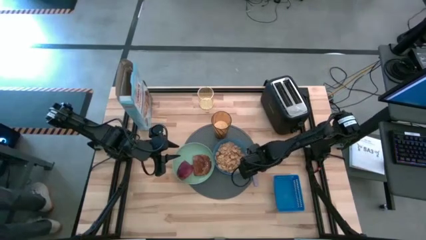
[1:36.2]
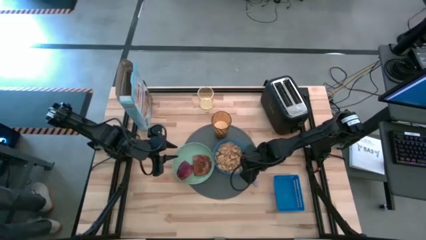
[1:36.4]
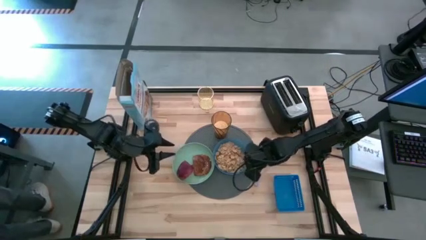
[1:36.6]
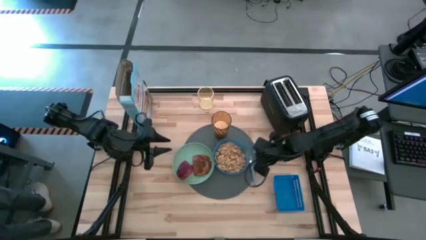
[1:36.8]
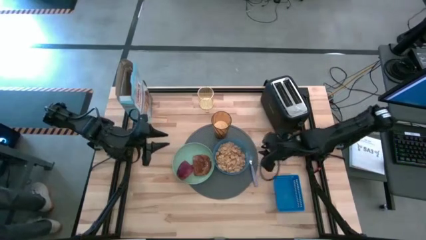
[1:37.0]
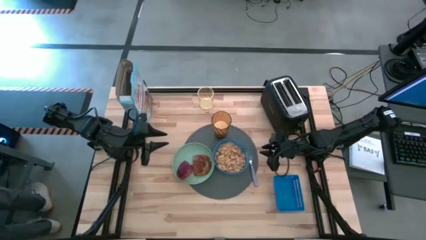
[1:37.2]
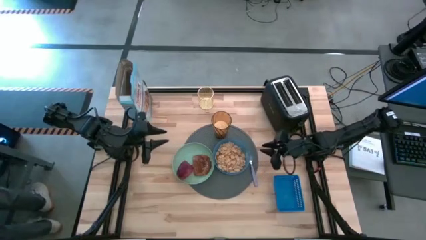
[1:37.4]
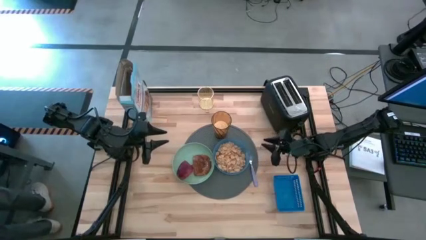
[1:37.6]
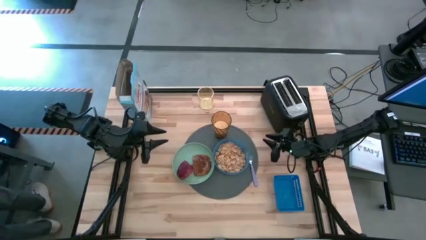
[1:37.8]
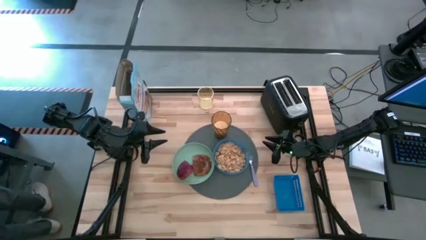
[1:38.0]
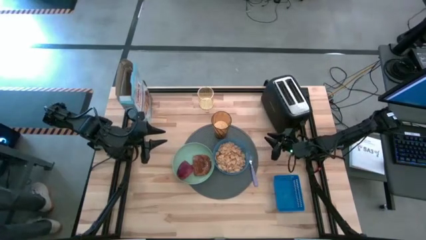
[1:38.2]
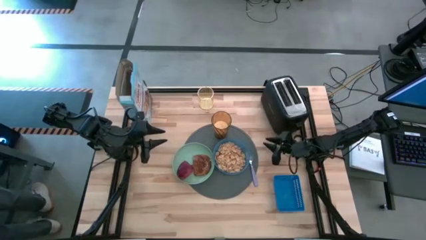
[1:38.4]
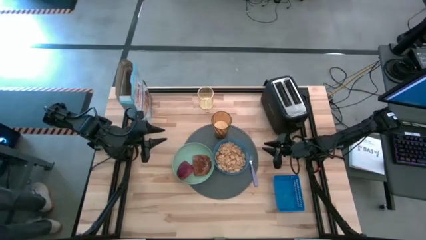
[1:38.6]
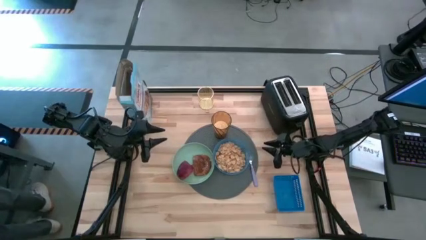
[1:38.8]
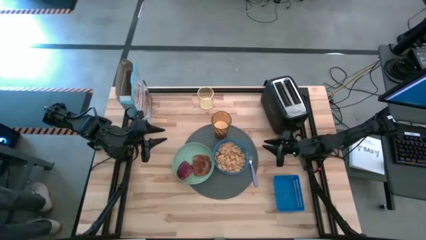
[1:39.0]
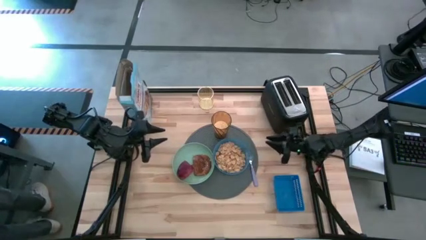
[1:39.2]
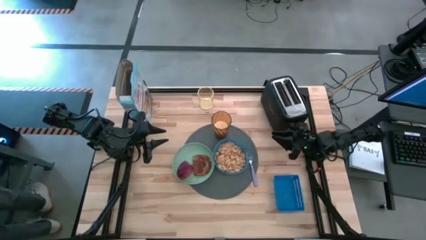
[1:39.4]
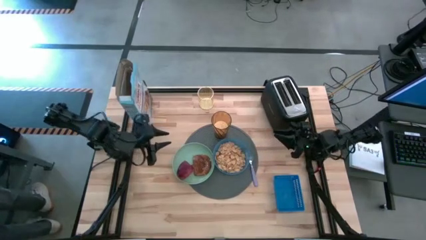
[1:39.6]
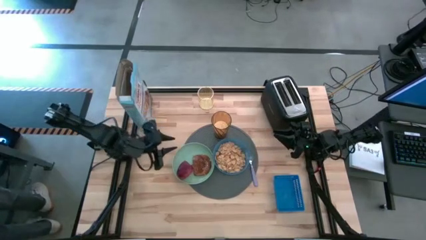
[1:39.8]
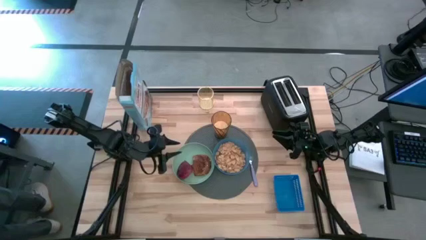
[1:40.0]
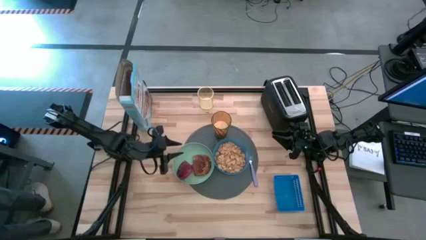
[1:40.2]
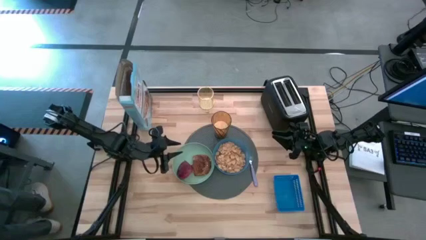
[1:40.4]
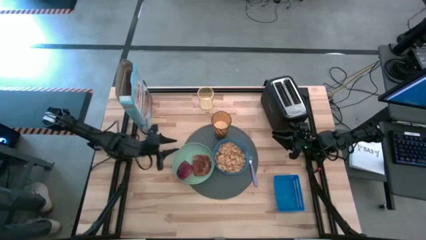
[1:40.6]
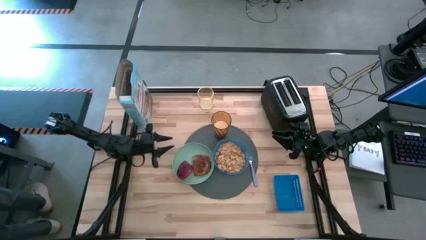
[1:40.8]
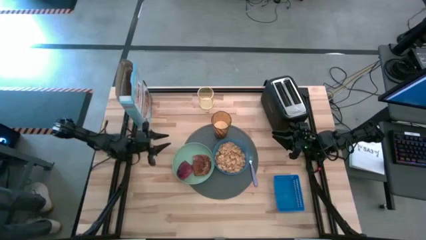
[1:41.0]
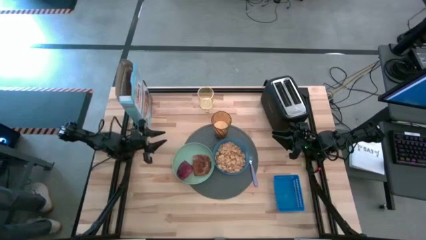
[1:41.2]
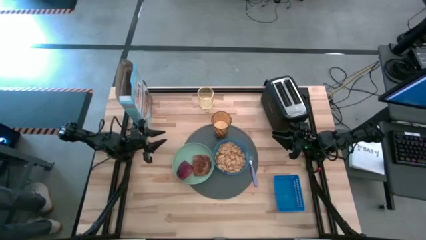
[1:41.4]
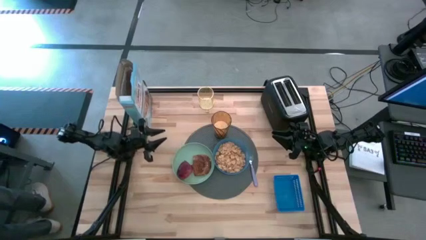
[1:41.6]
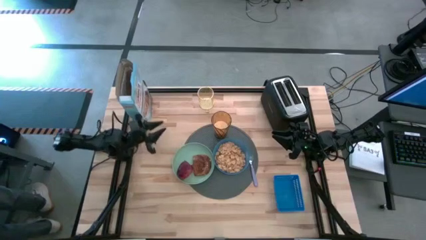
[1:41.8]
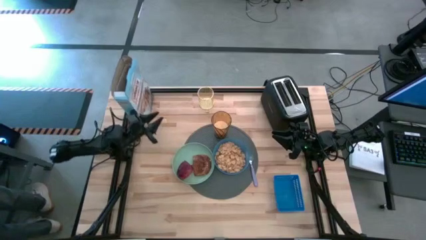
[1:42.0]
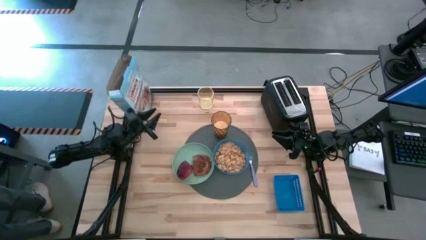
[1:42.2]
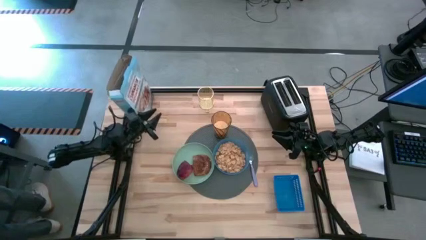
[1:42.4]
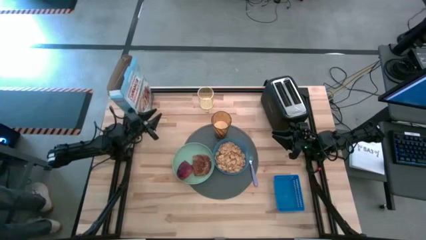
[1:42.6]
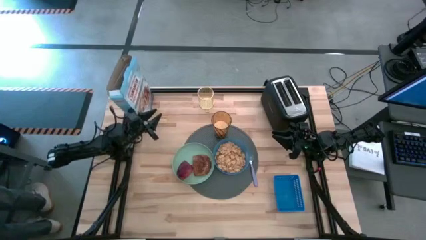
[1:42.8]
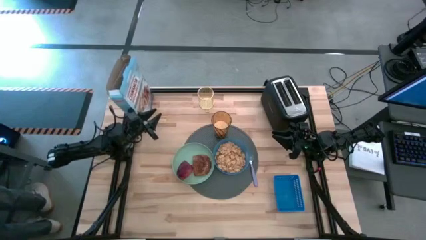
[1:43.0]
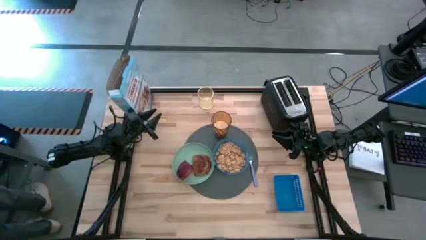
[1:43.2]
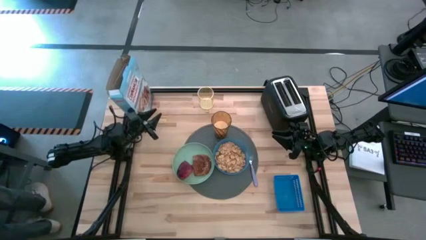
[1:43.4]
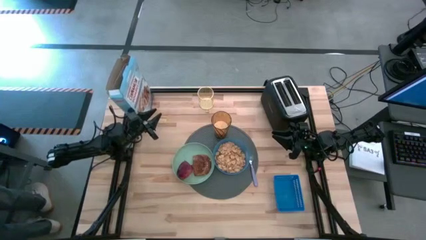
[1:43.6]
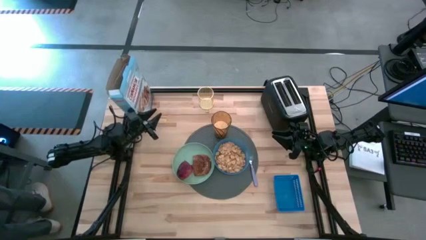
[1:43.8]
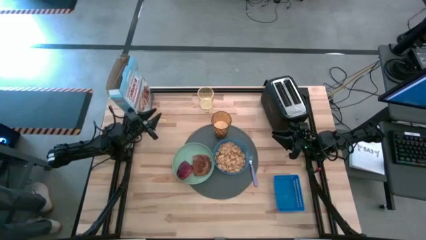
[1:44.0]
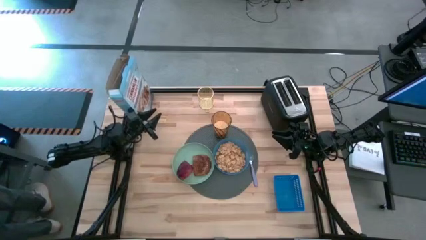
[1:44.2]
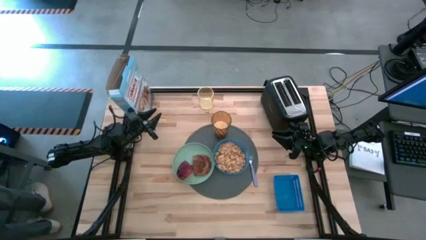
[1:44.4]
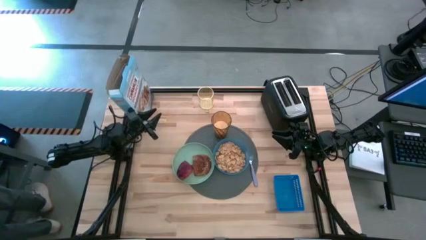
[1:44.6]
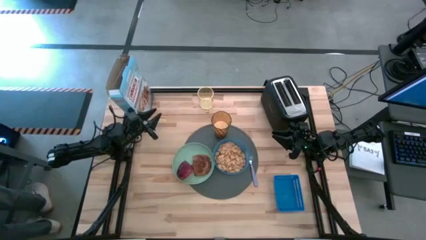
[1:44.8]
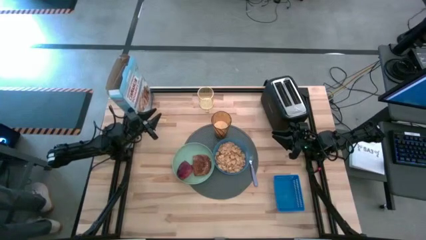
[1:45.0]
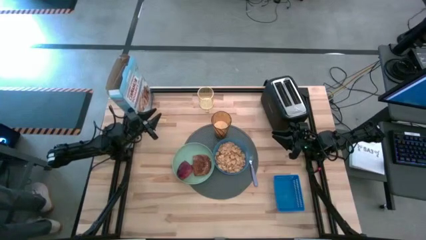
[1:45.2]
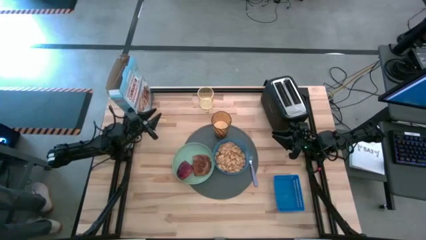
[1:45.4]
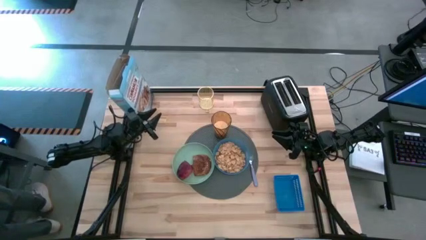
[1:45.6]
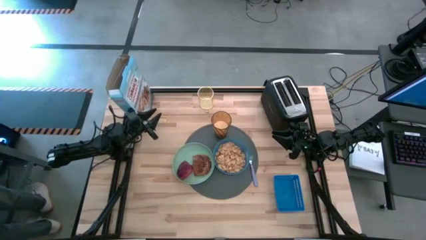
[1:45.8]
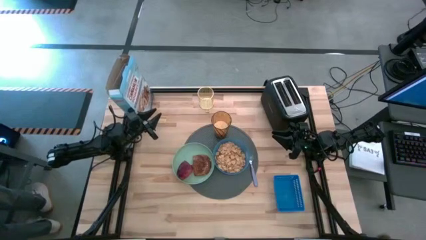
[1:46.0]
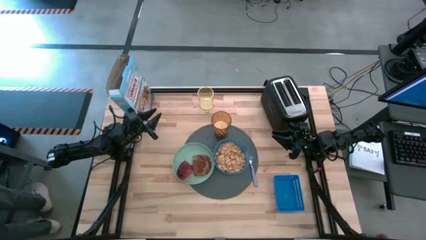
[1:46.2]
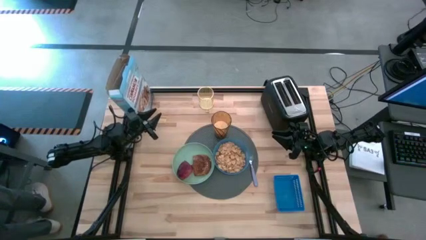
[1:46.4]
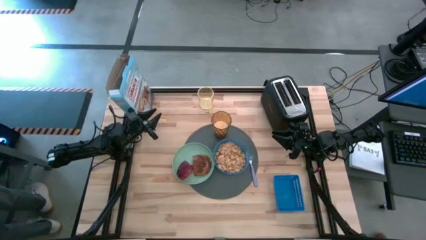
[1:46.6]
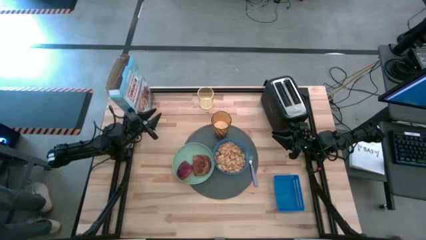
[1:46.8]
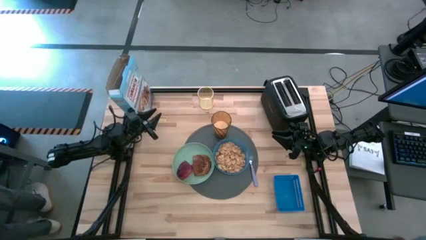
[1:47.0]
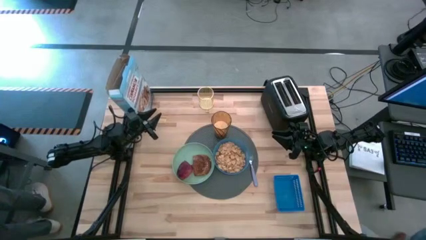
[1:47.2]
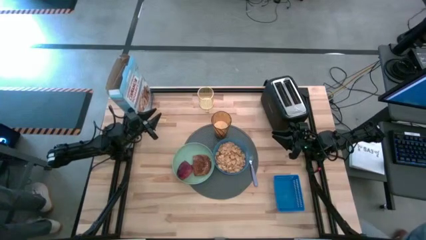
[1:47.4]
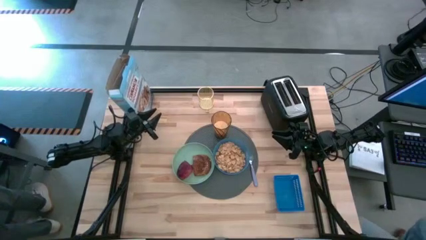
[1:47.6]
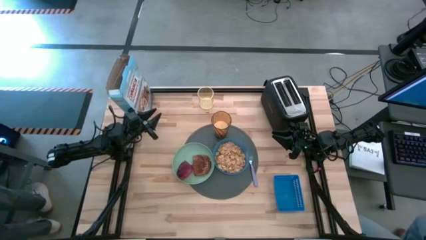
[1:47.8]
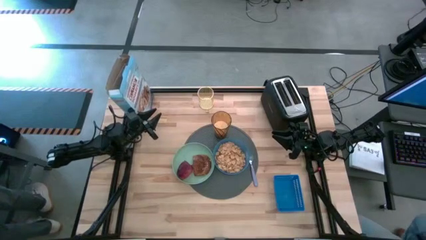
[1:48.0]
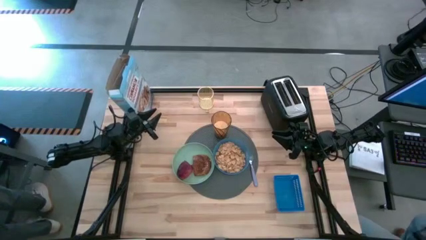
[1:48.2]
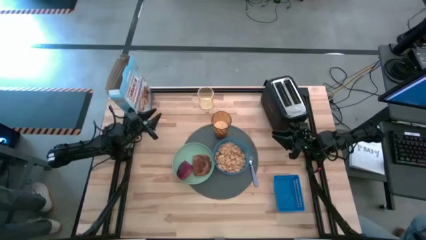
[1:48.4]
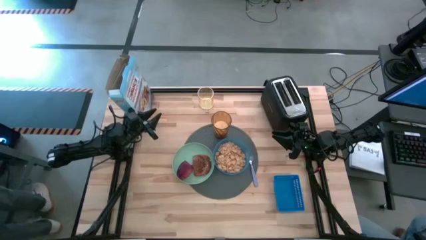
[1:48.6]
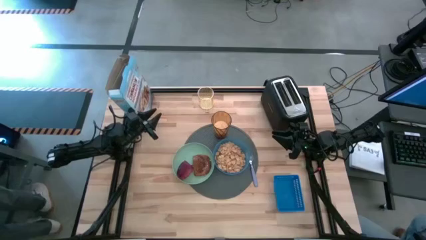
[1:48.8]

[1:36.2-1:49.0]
Task: Arrange a breakfast setting
Return to Home Position

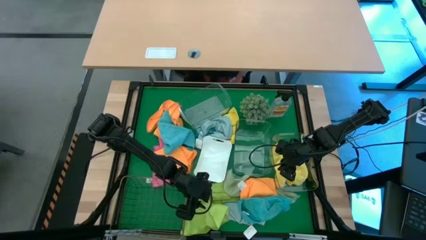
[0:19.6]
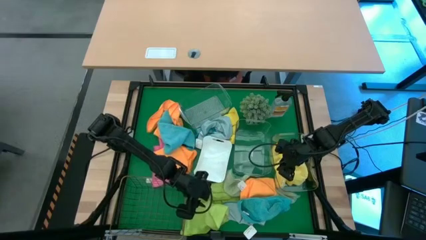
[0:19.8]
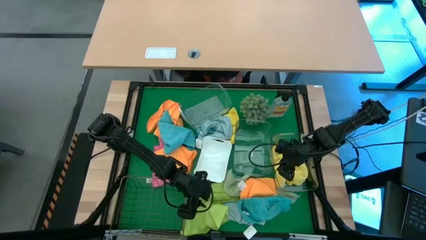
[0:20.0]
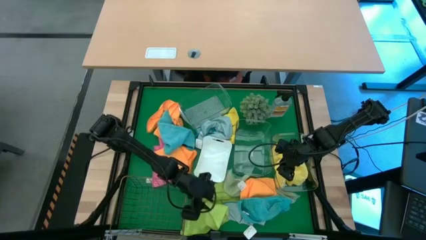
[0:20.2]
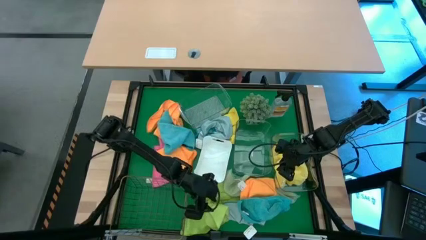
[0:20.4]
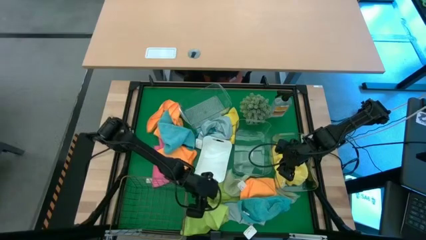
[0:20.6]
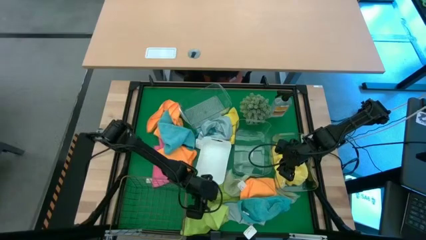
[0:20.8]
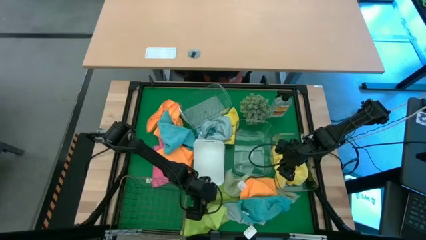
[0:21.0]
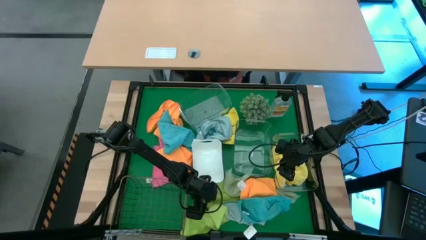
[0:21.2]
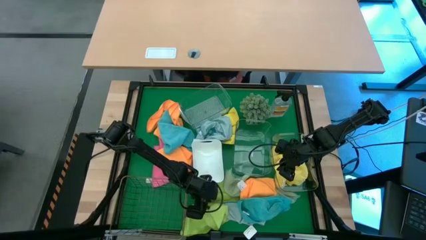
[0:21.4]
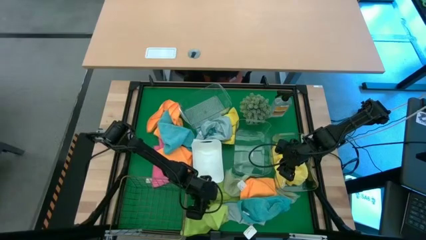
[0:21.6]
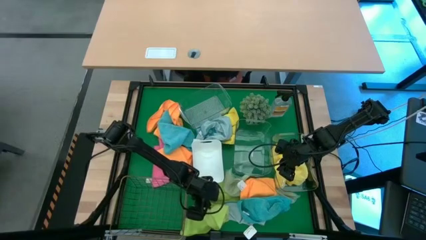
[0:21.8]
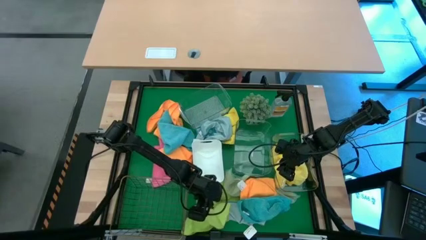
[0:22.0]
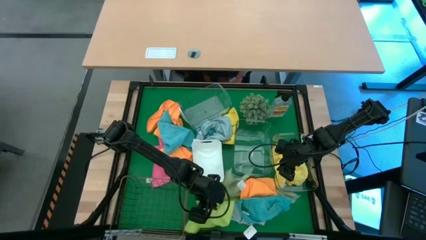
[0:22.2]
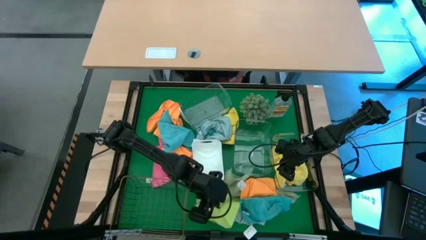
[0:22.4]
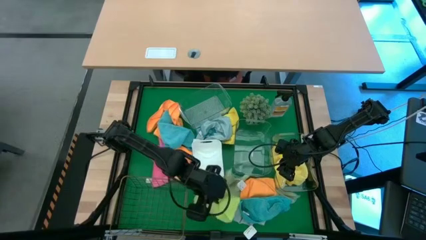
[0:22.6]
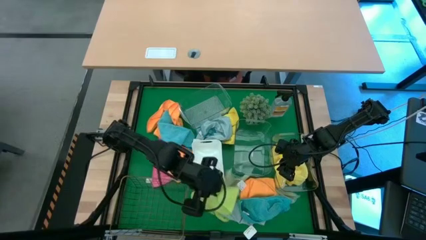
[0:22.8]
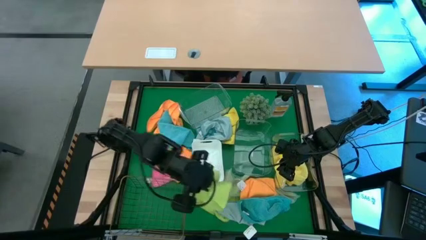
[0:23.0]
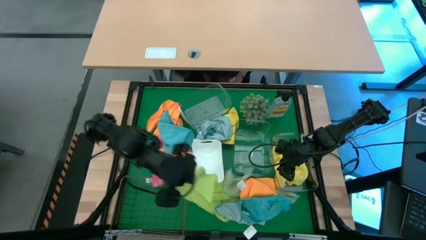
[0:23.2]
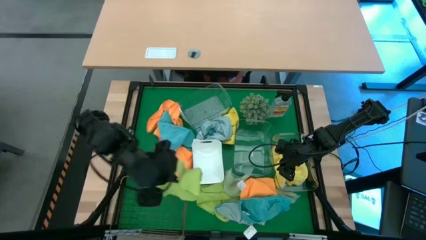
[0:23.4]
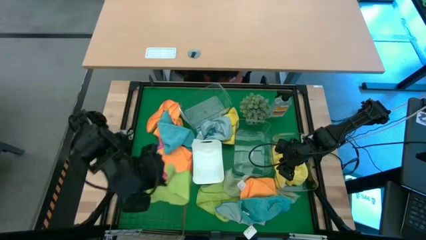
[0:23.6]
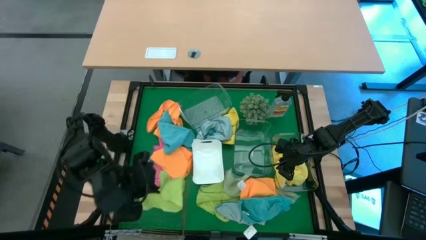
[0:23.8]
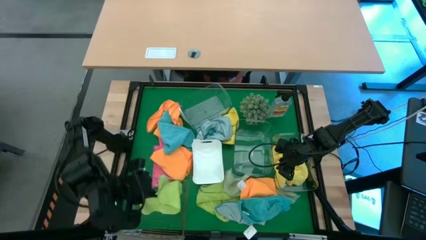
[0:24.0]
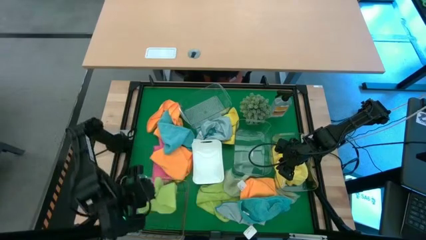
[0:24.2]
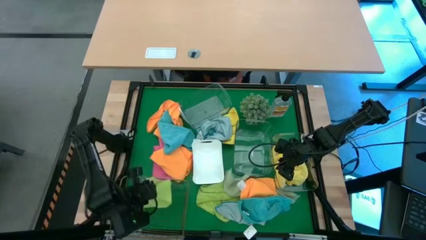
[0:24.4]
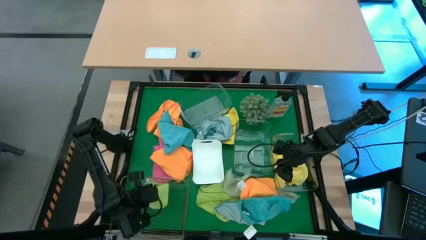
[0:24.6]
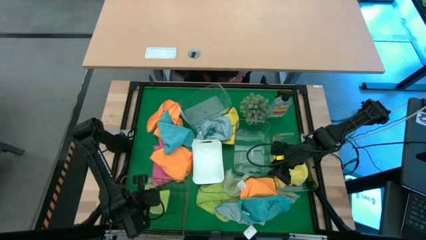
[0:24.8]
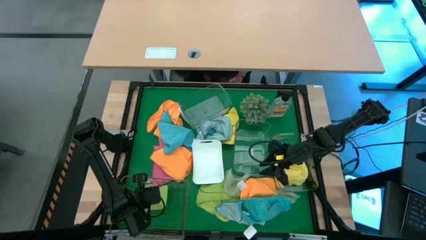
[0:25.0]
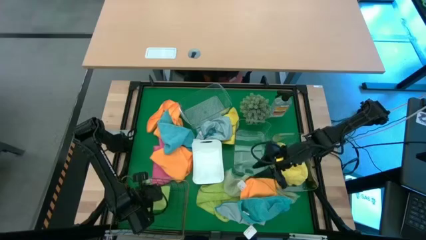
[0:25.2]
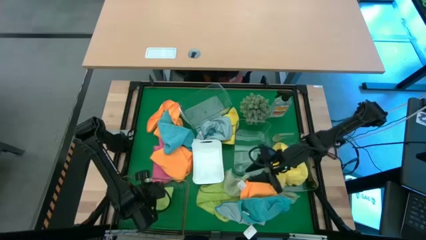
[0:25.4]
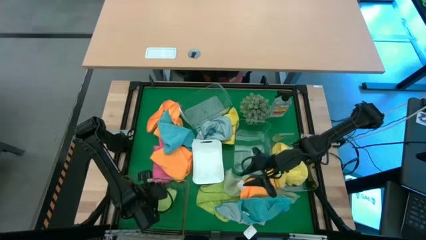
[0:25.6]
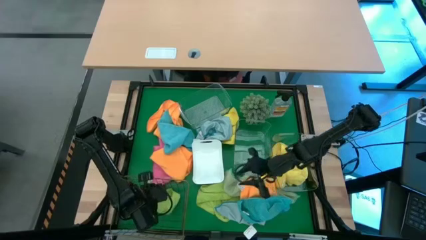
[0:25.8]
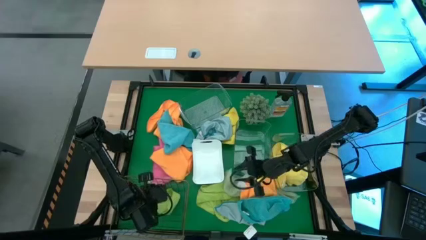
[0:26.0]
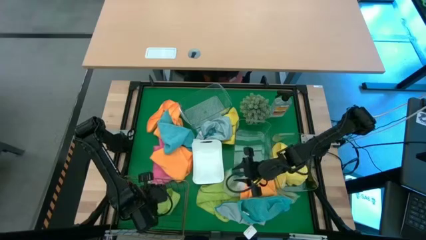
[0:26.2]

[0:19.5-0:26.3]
Task: Sort microfiber towel by color & place in baskets
Put the green microfiber towel into the gold wire basket
